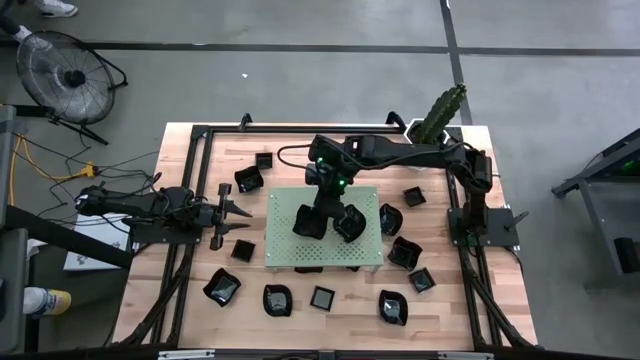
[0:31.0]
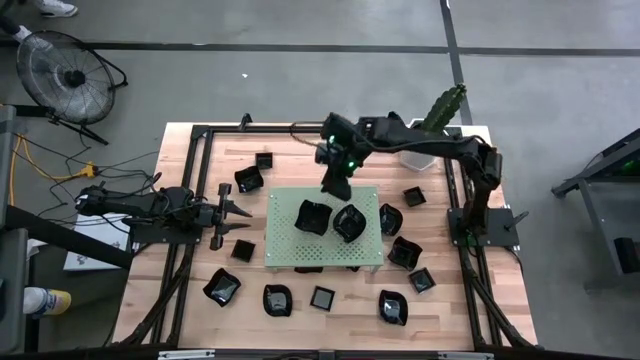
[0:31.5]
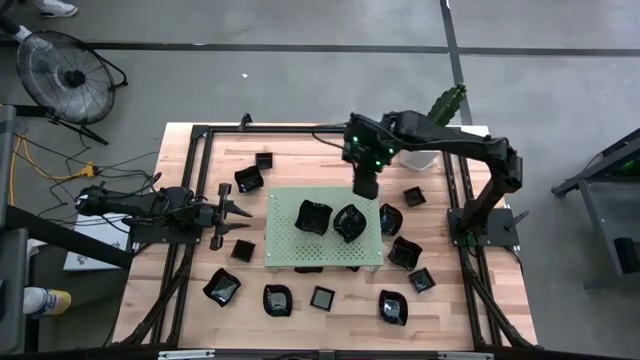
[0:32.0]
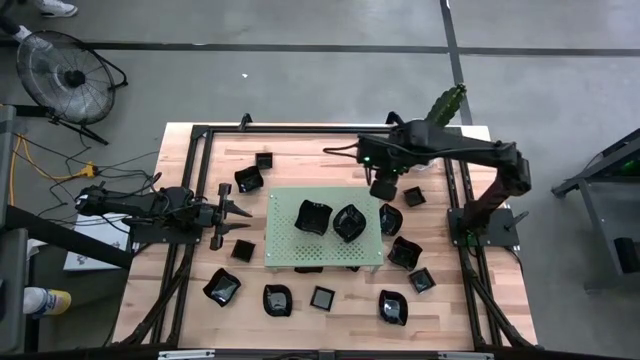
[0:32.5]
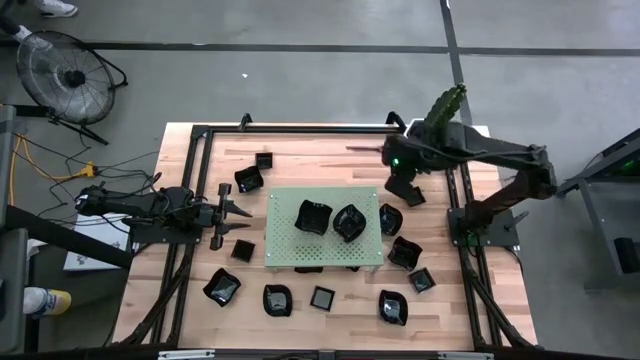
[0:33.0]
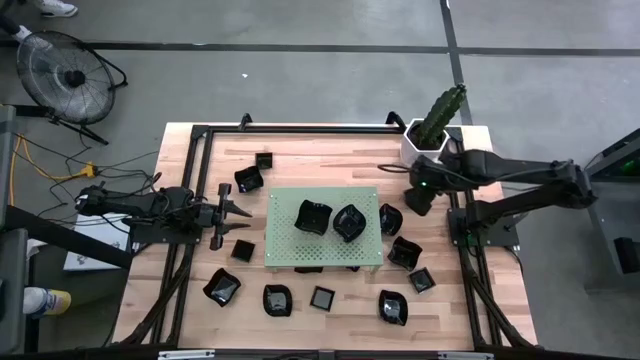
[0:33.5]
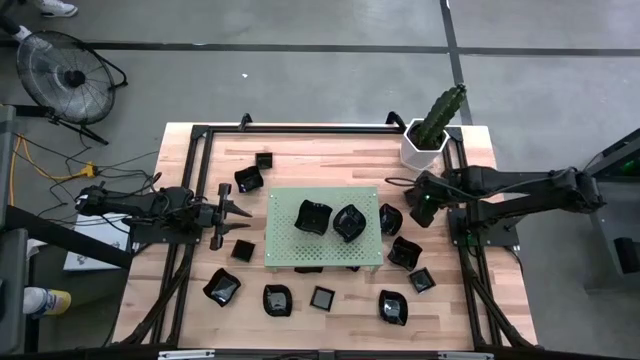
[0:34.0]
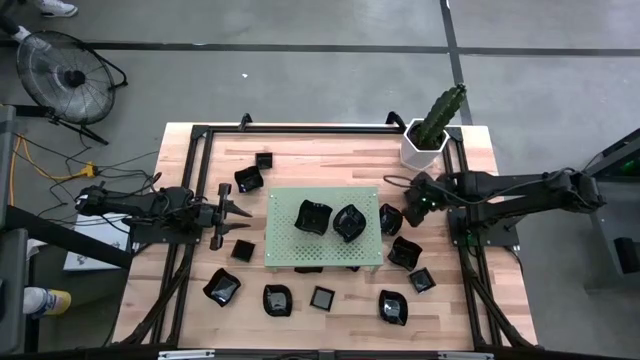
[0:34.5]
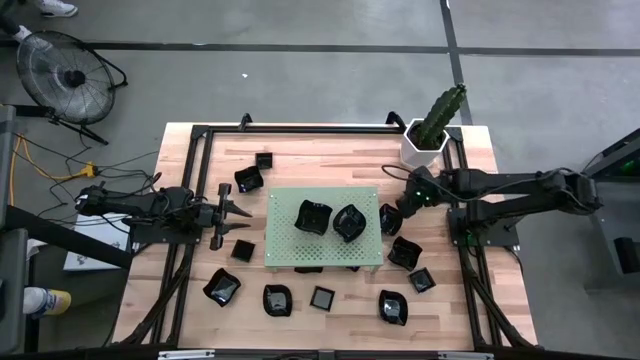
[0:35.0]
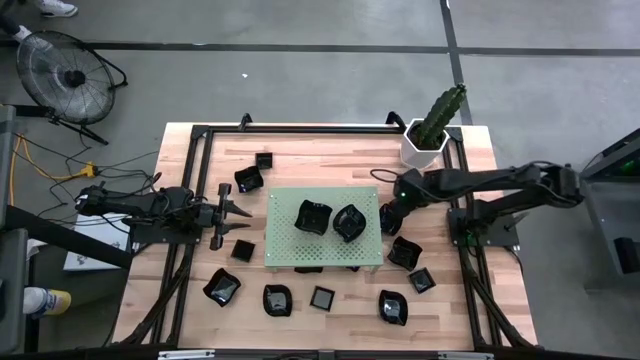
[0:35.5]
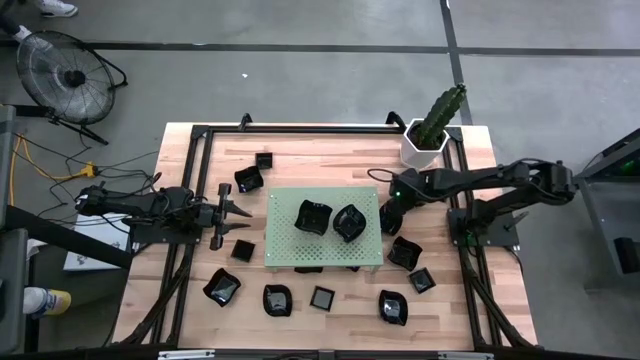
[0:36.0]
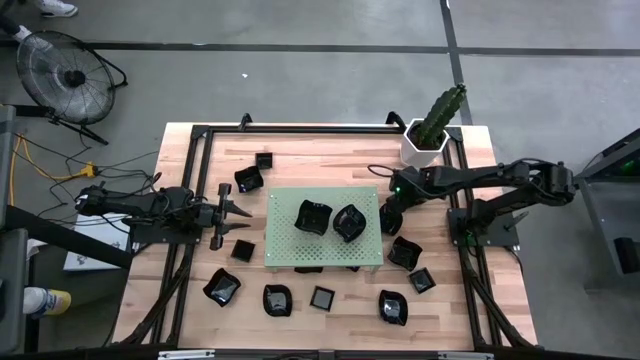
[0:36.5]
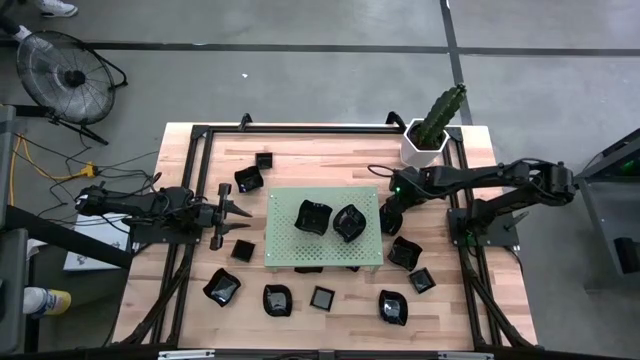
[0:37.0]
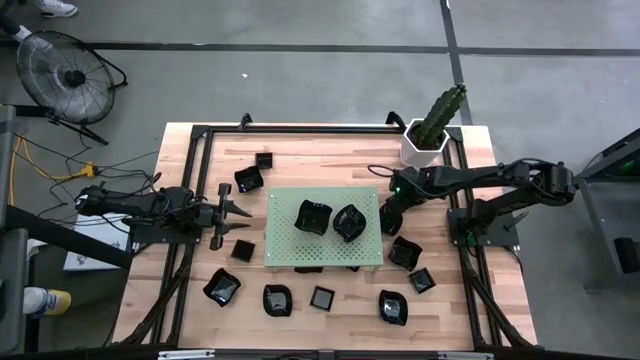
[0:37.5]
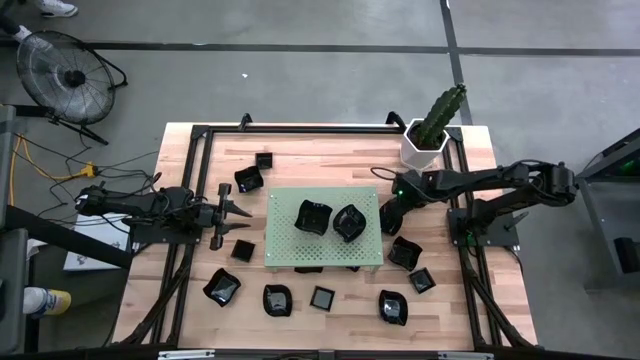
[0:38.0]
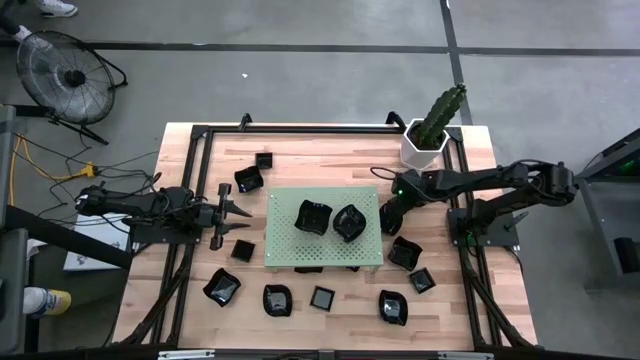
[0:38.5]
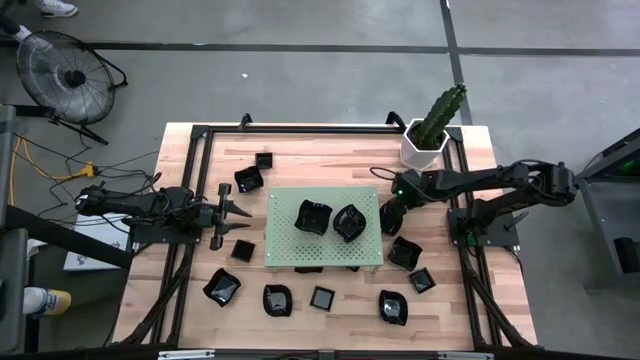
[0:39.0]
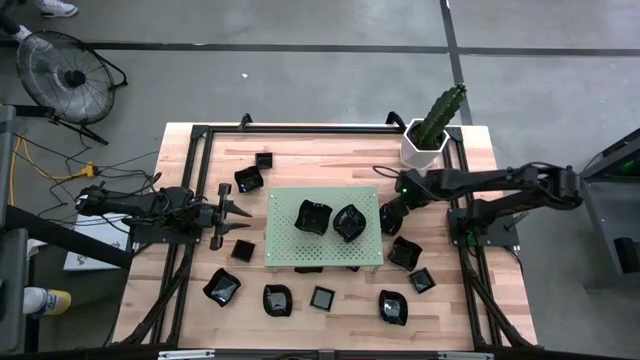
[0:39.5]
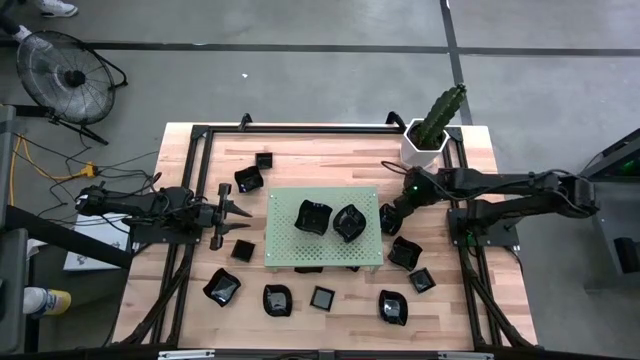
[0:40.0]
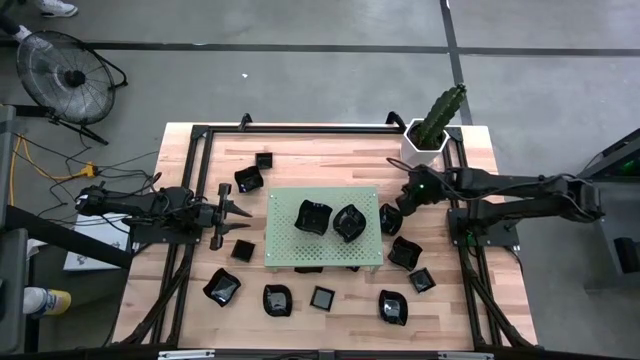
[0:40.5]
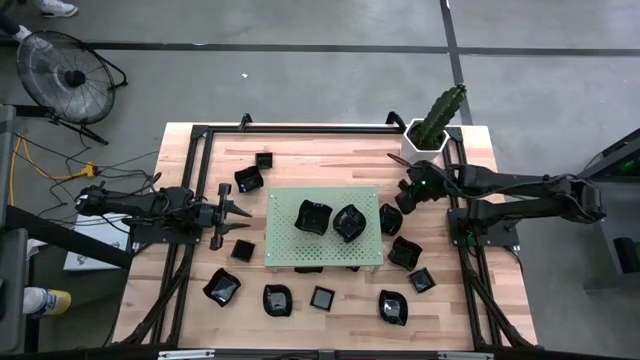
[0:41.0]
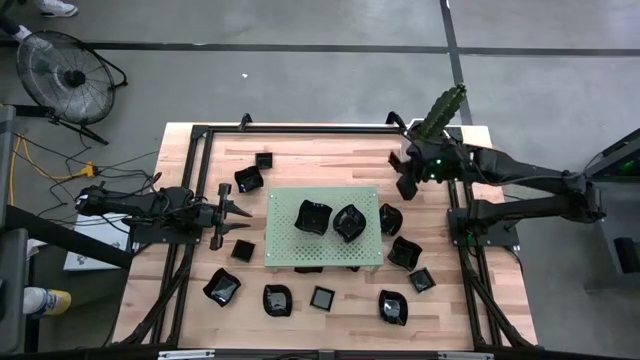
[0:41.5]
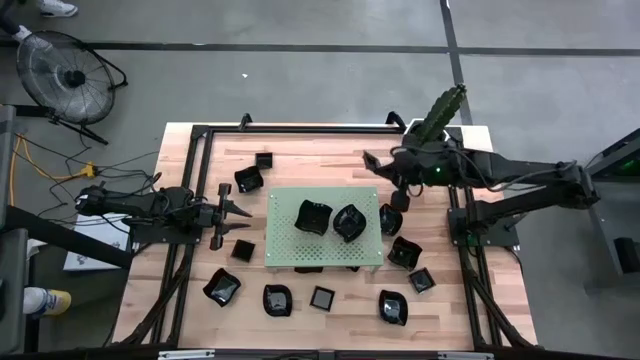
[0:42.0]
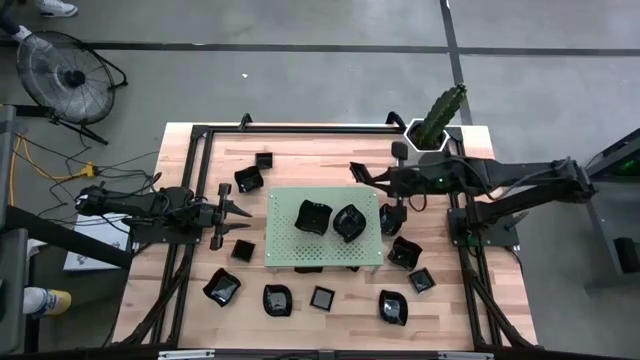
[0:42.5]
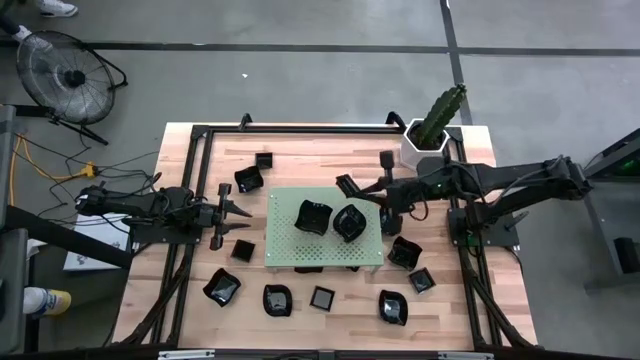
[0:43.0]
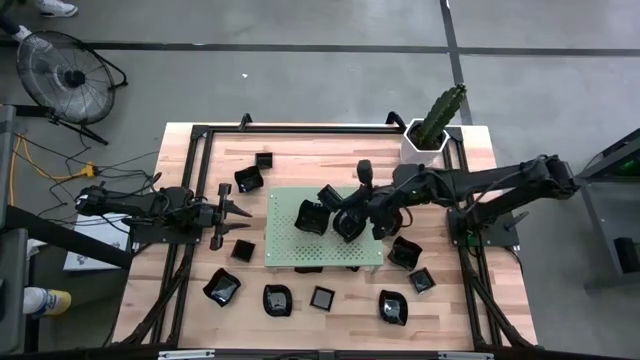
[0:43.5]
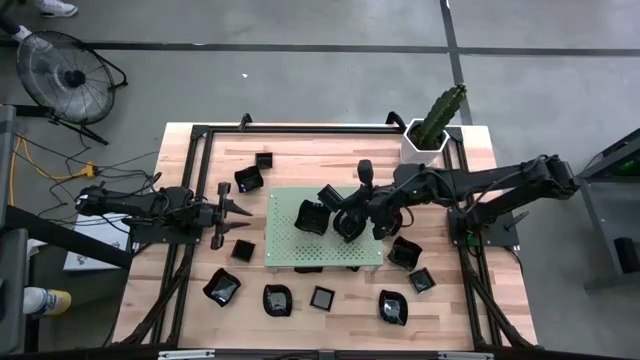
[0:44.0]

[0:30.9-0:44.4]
Task: Pick & Place Mini shaped plates
Put the black square shaped plate on the shelf

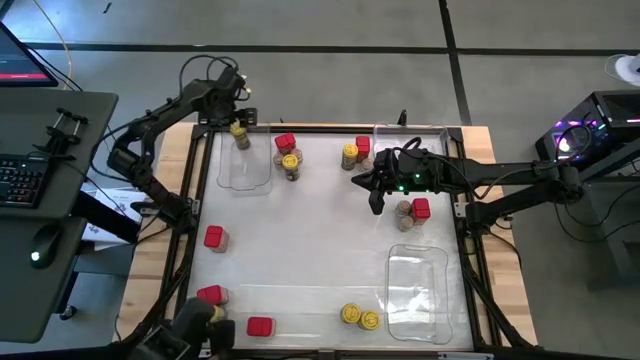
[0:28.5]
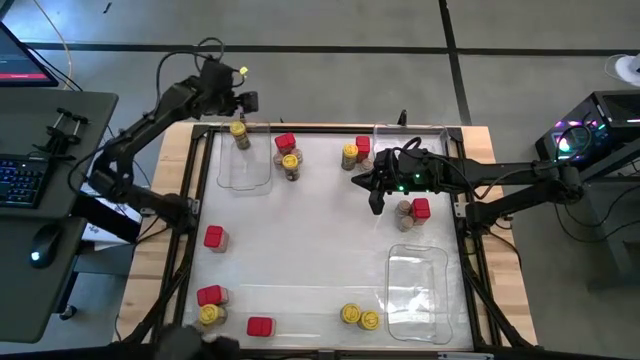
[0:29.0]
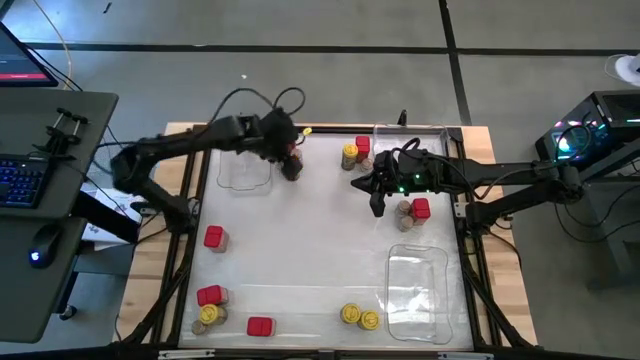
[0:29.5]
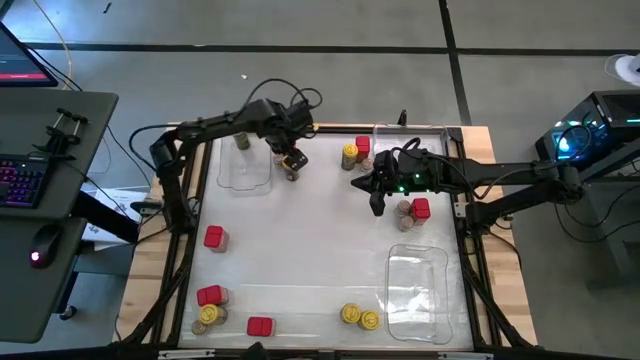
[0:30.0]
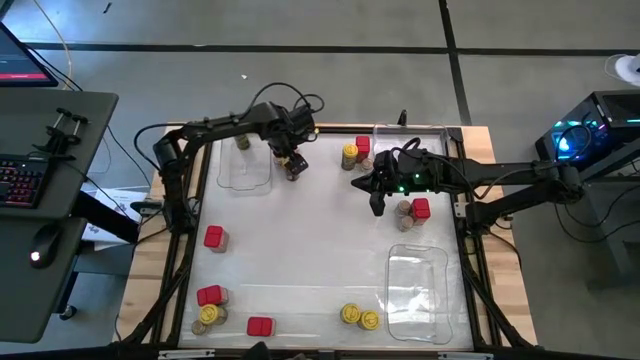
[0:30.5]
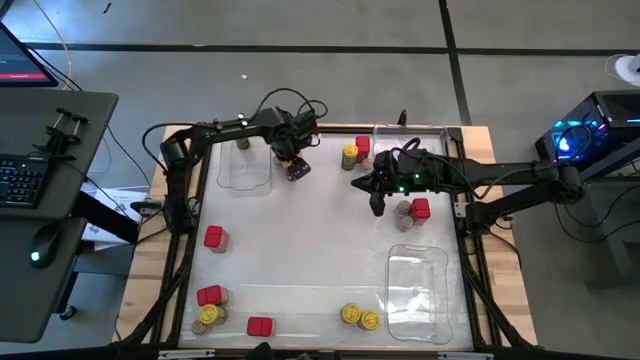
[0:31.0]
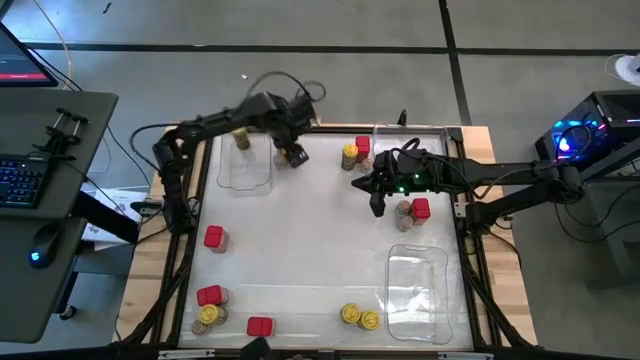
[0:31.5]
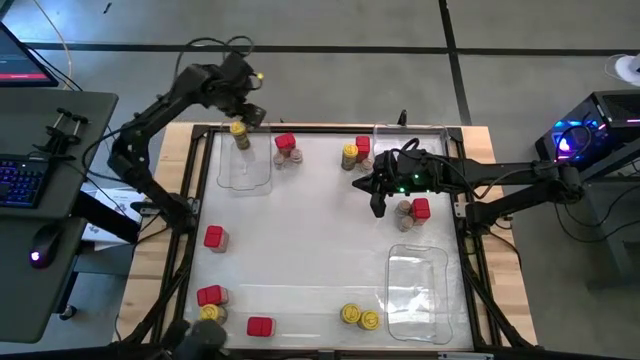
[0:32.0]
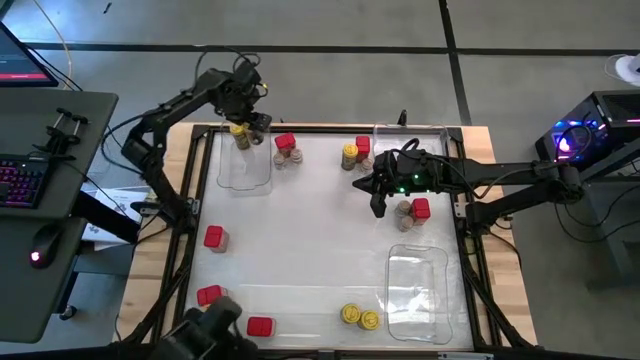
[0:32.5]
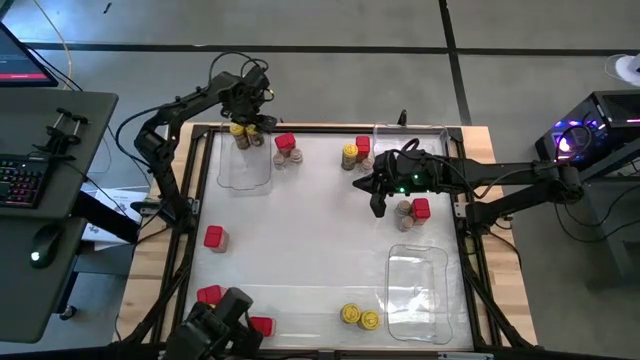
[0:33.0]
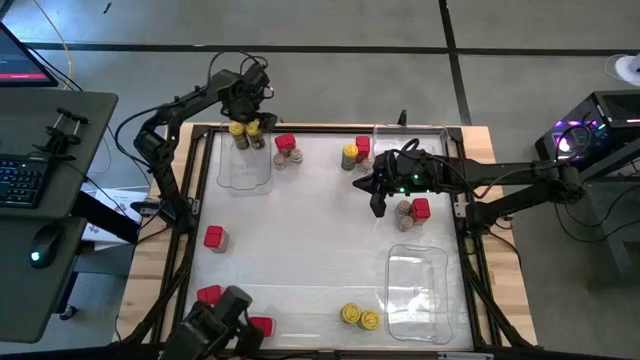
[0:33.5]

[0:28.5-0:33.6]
Task: Sort spices by type
Put the yellow seasoning bottle into the top left transparent bin

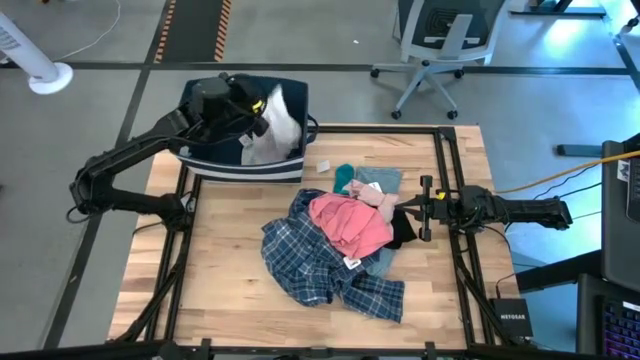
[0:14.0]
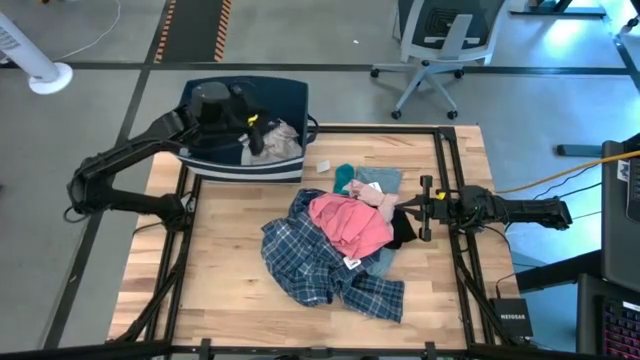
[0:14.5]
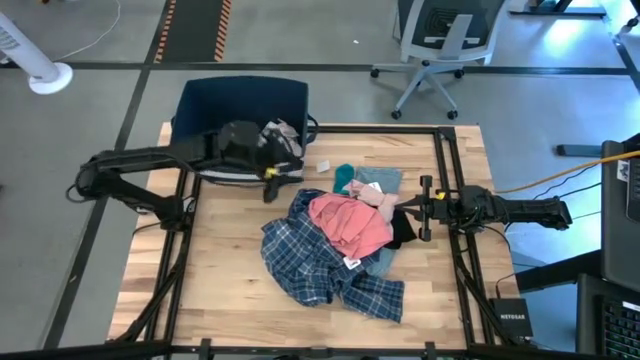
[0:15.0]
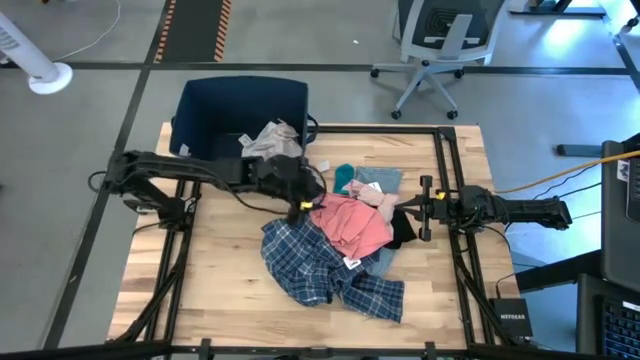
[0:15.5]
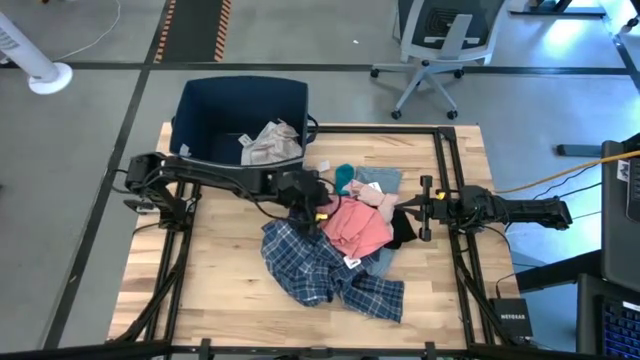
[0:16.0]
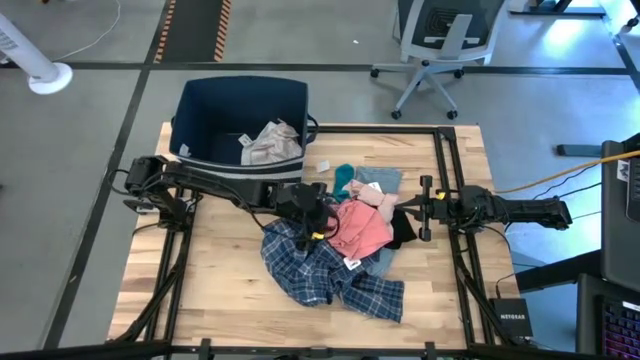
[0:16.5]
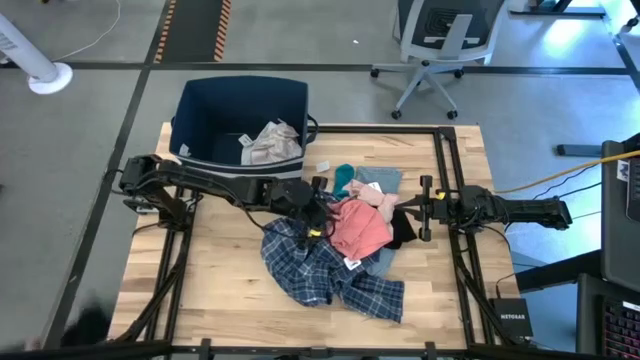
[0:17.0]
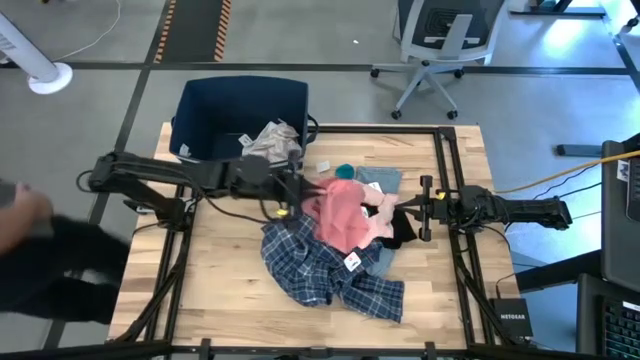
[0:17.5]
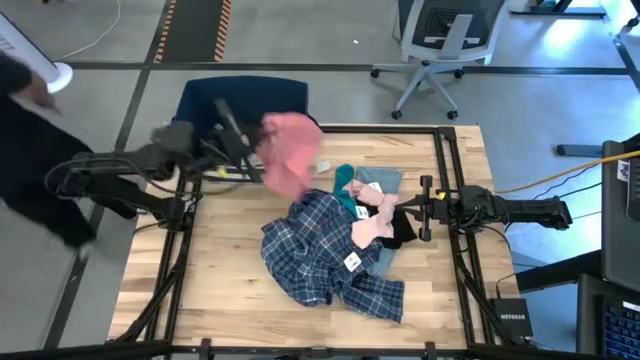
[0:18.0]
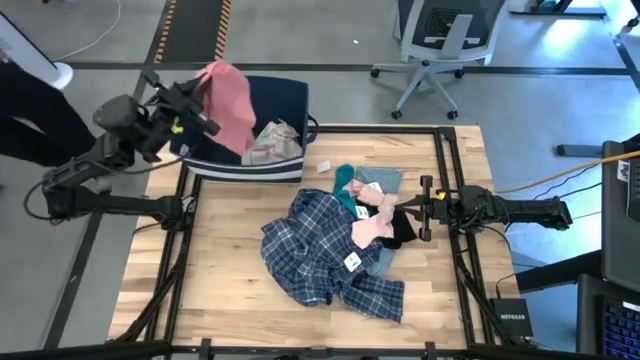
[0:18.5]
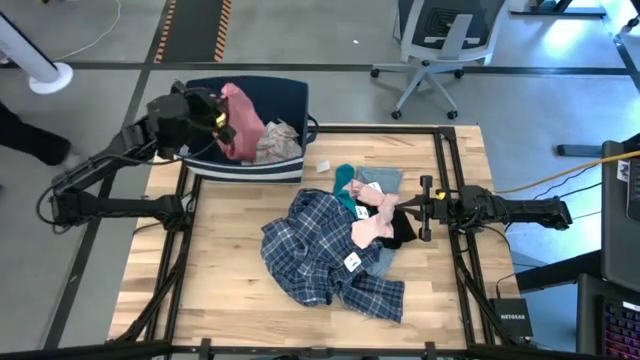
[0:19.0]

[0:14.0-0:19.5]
Task: Sort clothes
Put the pink underwear into the blue laundry bin
